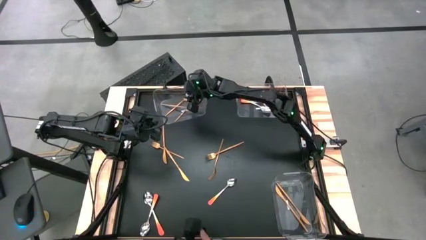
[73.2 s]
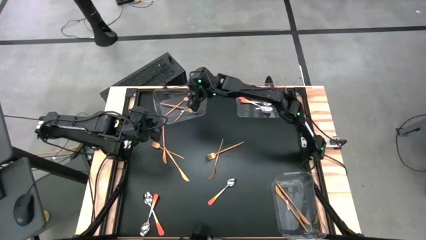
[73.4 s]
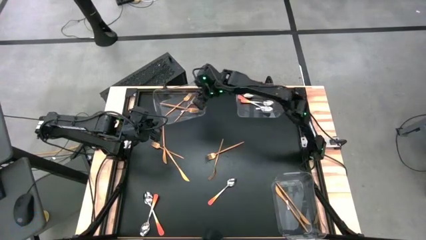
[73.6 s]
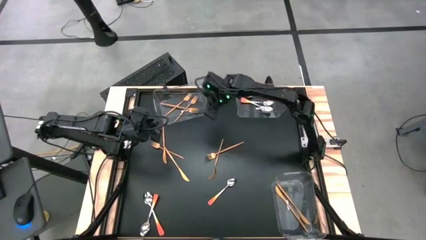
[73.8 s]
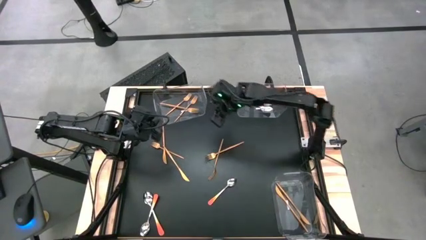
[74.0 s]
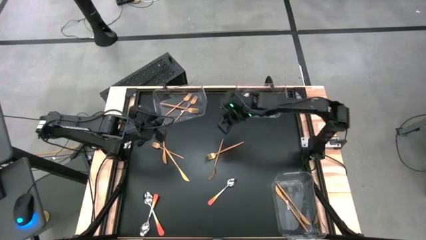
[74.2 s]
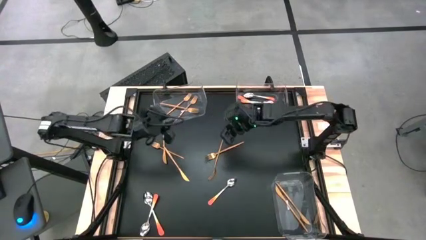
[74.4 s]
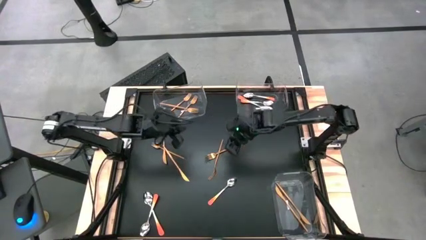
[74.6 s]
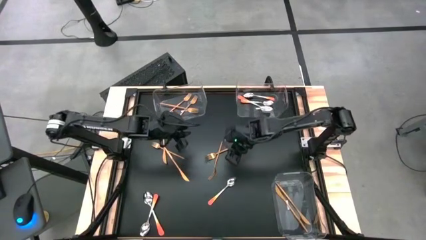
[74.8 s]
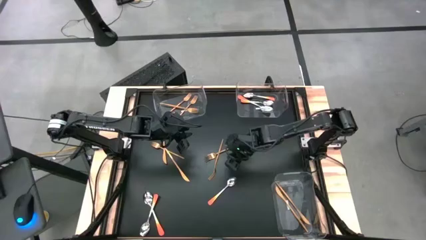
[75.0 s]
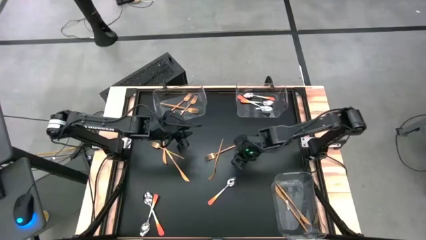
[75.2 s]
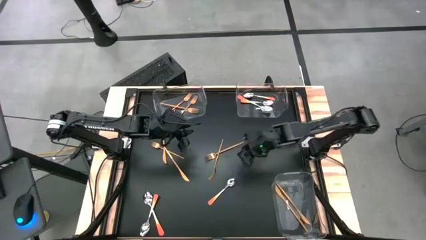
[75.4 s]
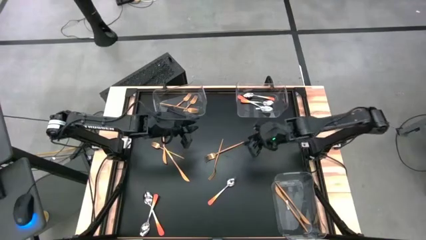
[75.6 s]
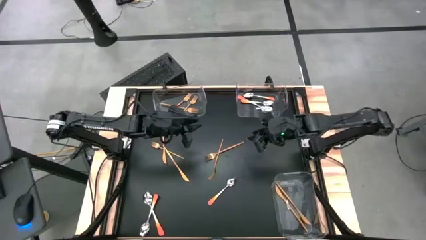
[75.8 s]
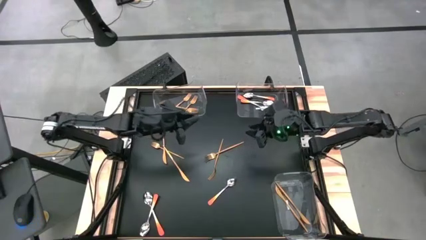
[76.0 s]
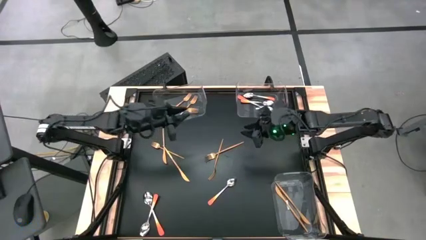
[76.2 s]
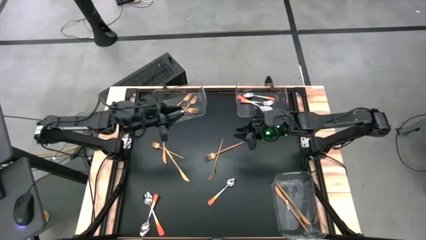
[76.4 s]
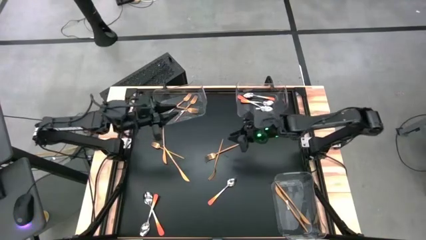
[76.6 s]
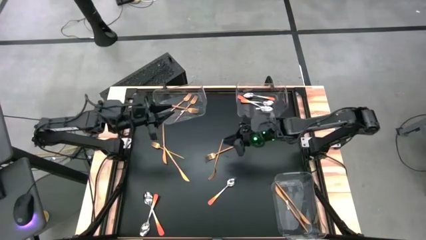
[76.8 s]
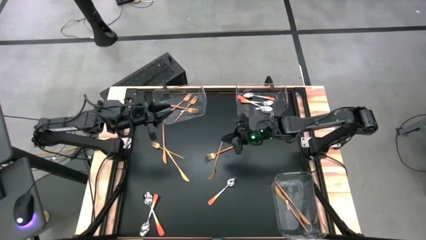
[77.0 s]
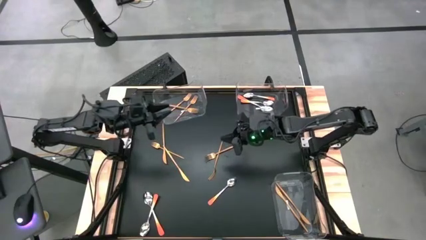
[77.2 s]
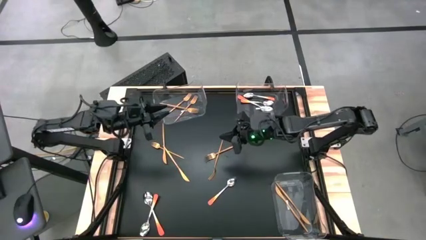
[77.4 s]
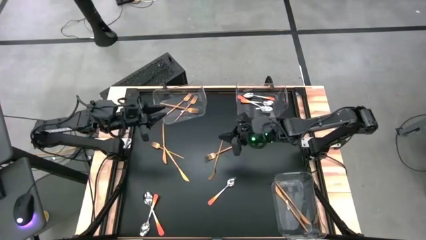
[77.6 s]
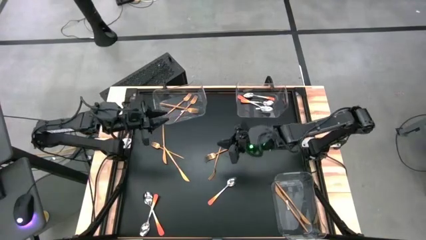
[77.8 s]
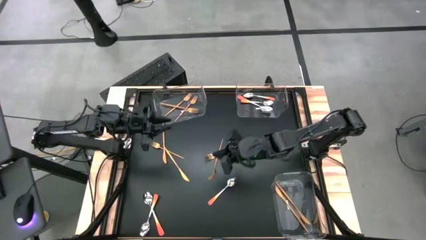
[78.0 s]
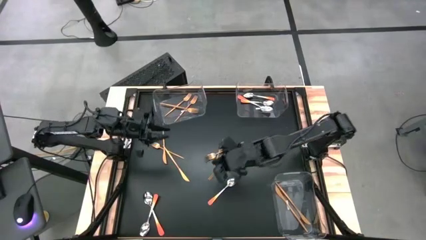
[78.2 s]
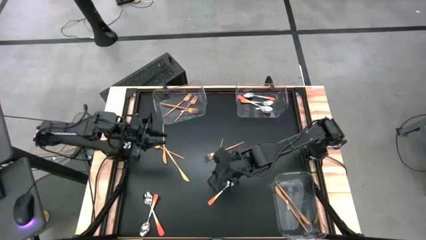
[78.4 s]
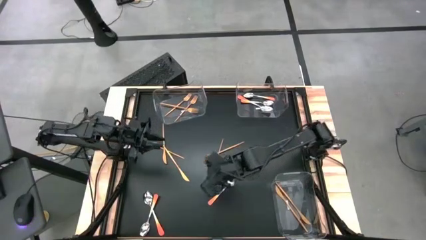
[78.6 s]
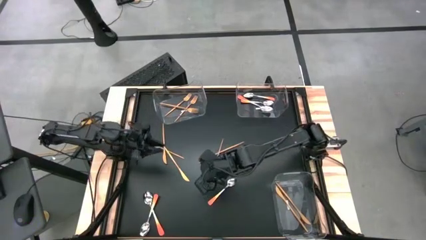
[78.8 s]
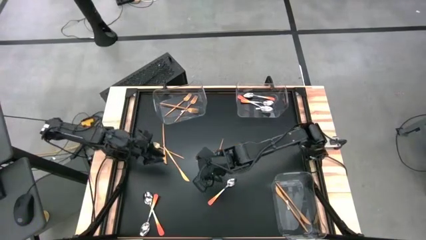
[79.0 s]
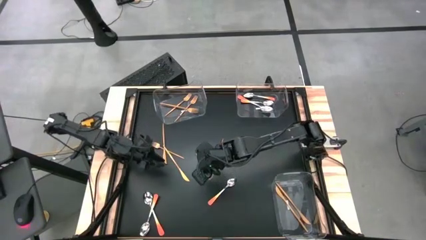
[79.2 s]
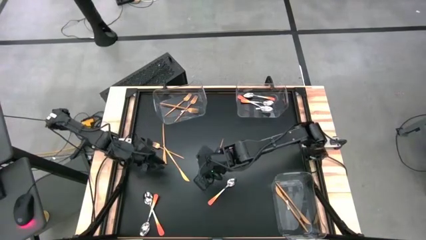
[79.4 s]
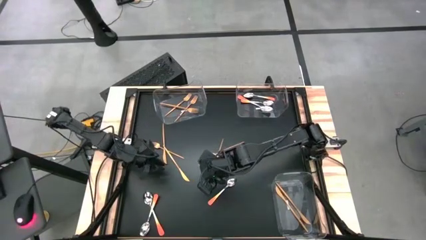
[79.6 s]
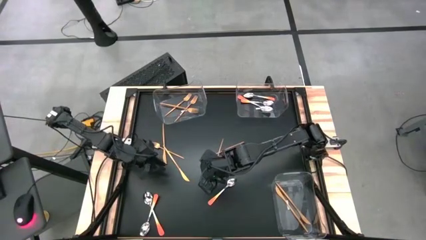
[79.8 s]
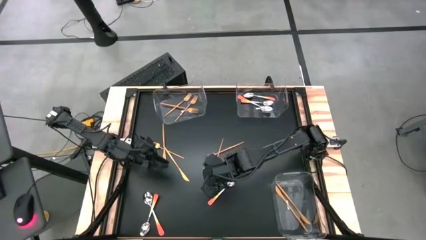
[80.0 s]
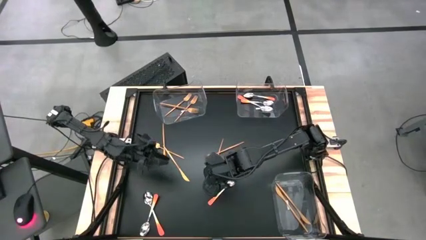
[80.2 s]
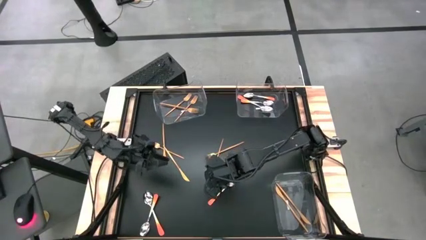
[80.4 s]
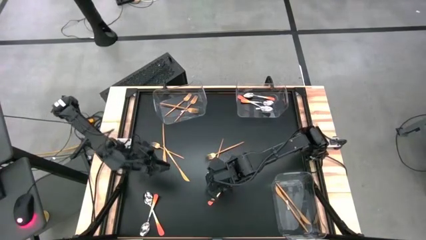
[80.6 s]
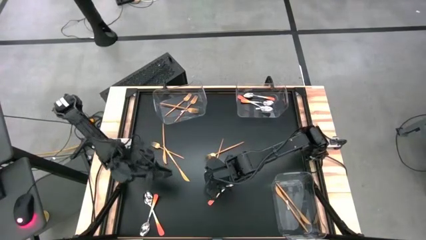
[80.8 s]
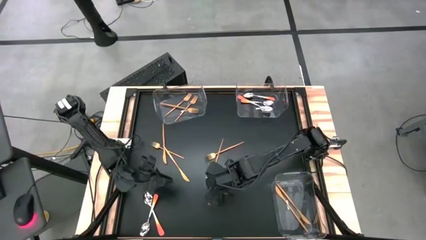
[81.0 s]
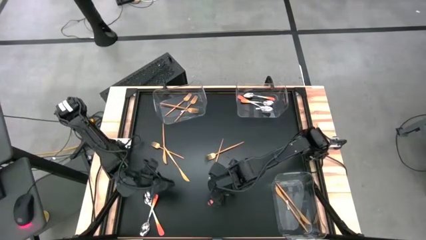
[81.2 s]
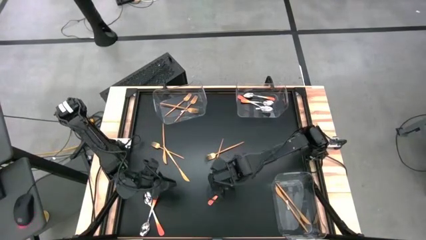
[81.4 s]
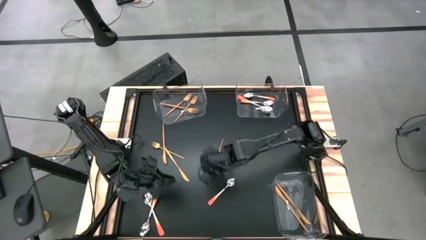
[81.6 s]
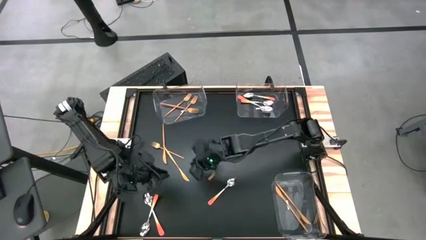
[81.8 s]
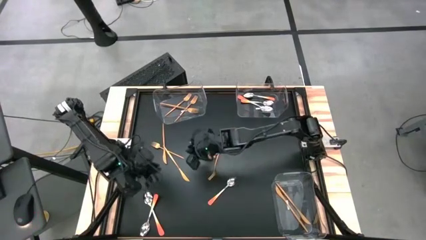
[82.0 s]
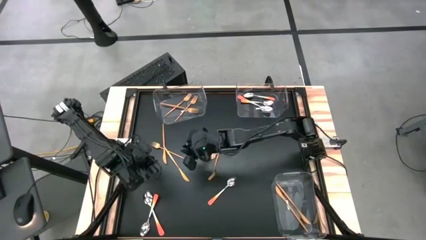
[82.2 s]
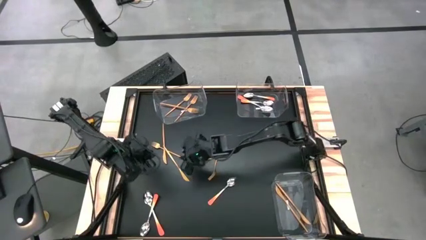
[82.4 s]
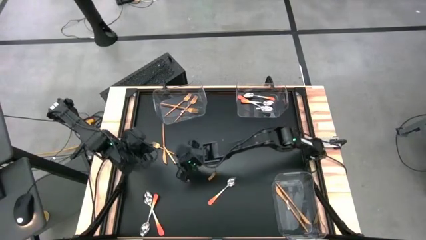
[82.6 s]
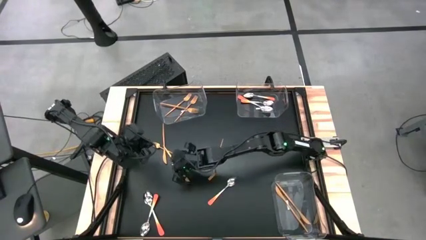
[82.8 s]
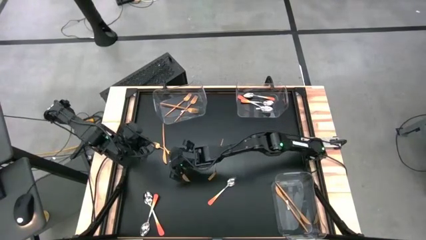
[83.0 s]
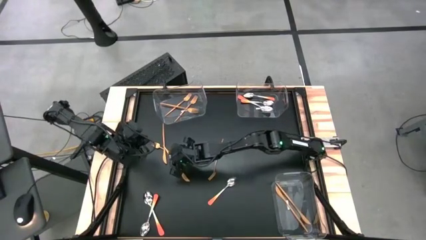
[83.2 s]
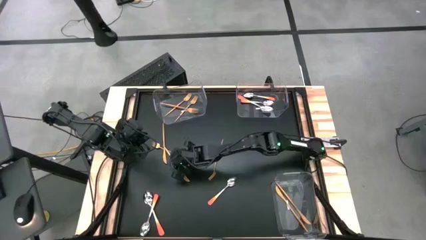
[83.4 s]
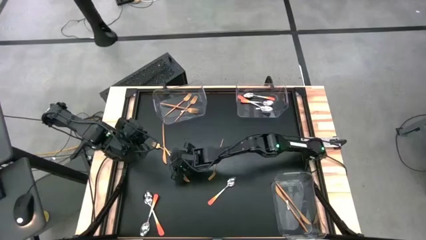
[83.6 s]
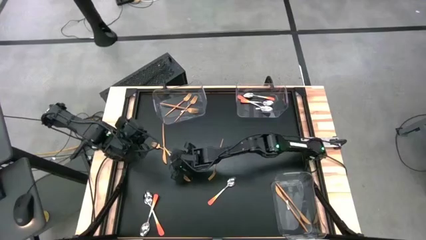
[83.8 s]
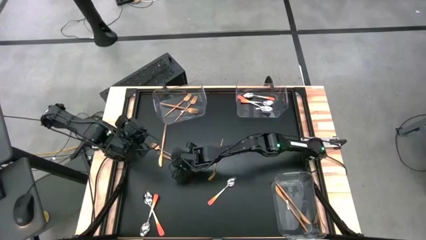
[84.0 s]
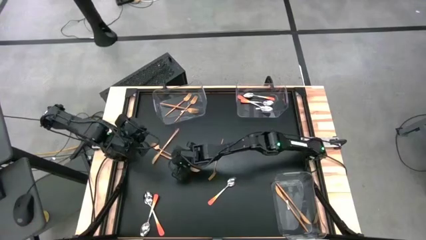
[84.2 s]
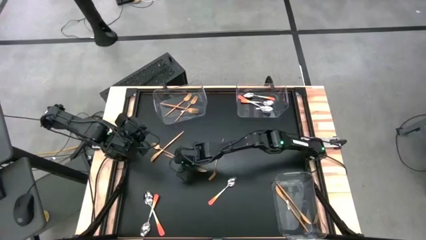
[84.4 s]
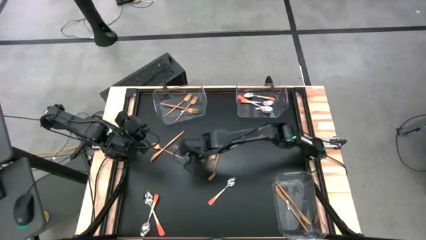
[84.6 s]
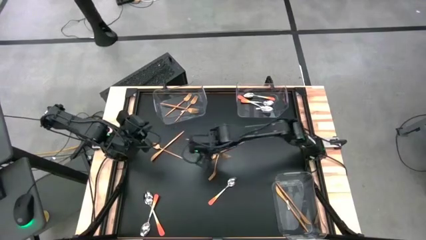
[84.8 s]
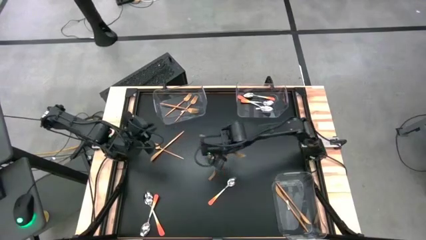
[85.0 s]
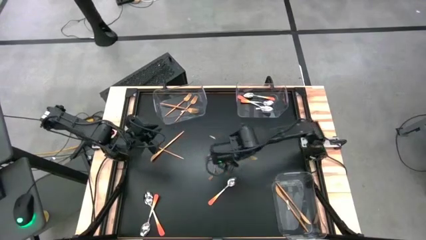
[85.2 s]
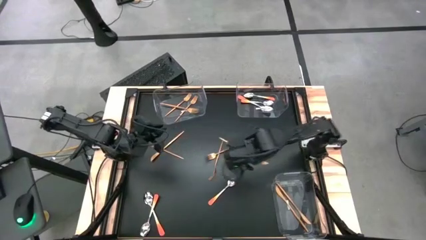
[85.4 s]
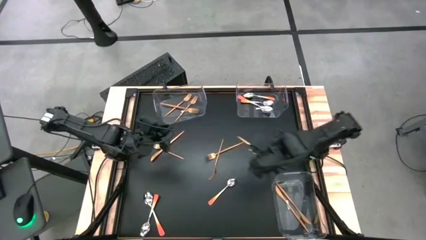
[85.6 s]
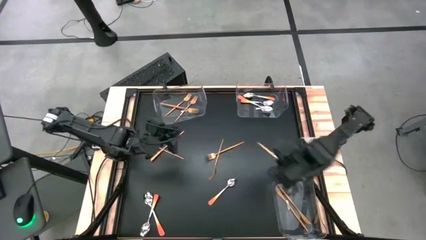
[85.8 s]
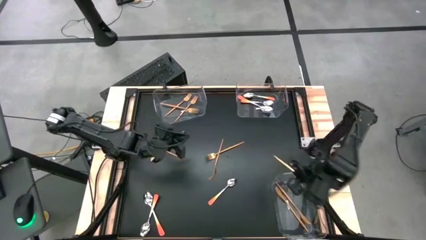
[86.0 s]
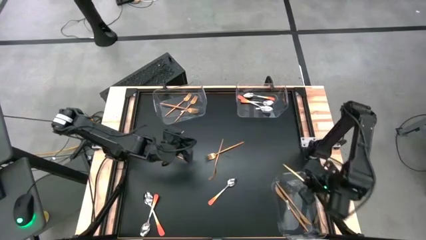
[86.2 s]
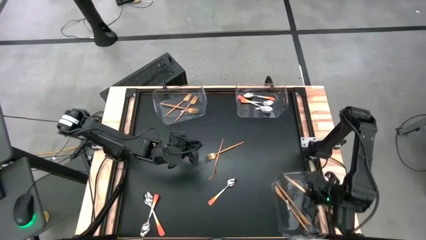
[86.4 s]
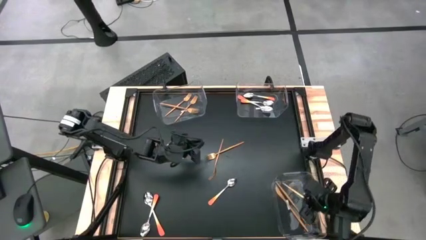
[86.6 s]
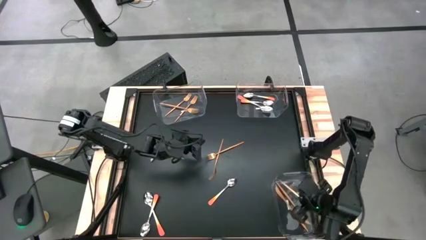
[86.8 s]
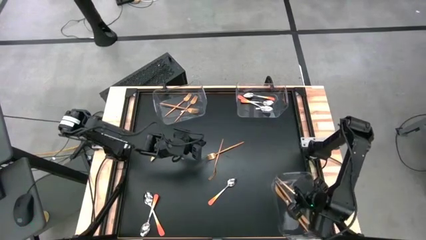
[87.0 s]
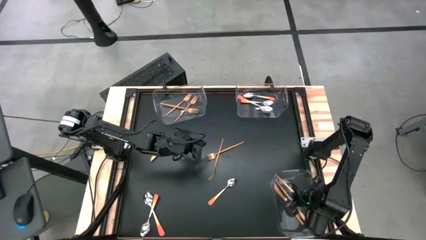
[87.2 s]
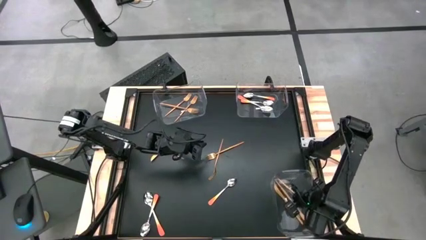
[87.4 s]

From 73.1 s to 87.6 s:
Task: Sort silverware by color (type)
Put the gold table knife into the bottom left transparent bin

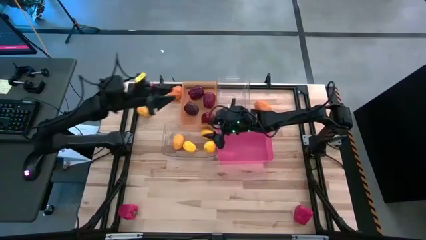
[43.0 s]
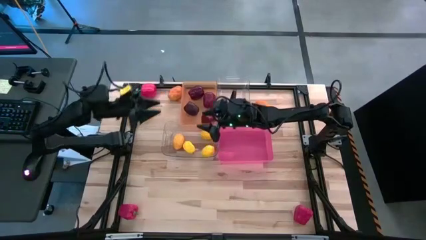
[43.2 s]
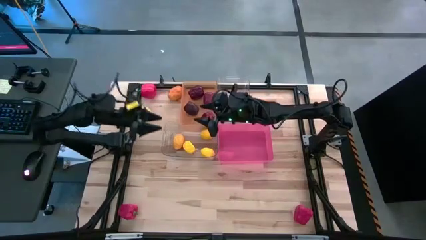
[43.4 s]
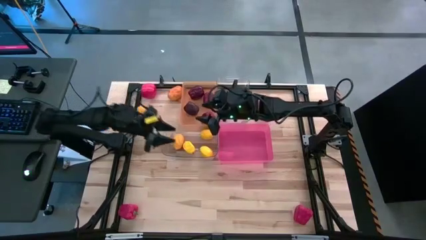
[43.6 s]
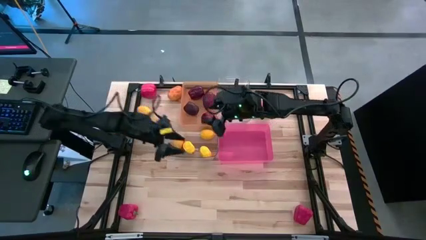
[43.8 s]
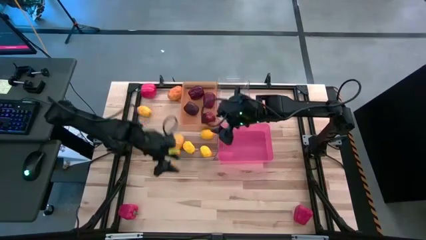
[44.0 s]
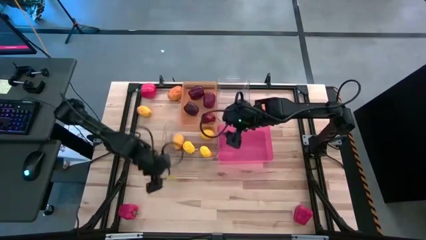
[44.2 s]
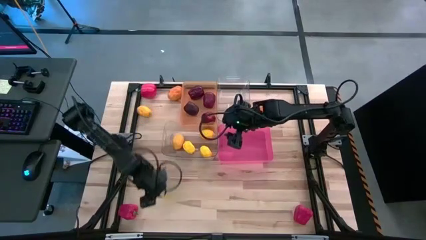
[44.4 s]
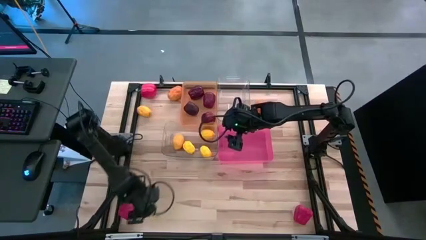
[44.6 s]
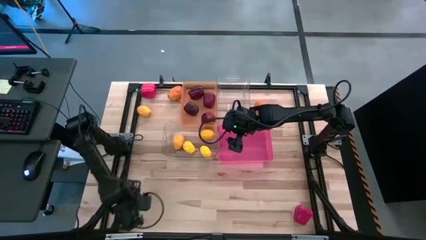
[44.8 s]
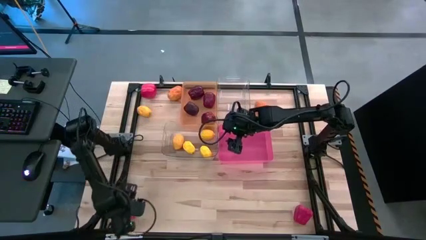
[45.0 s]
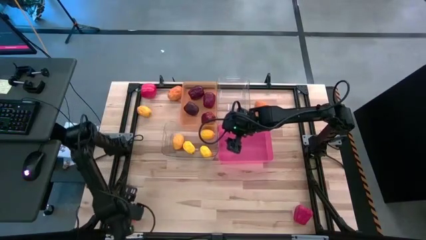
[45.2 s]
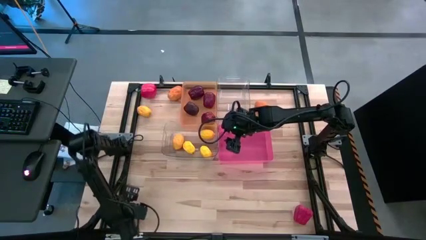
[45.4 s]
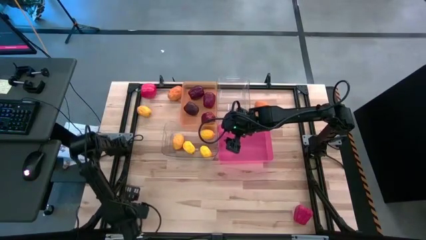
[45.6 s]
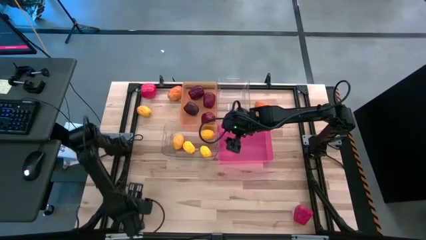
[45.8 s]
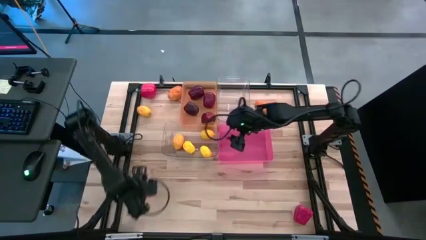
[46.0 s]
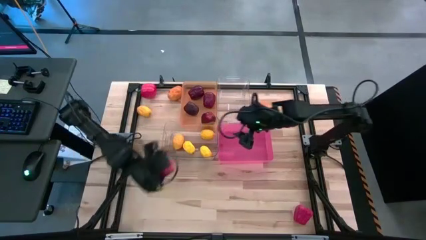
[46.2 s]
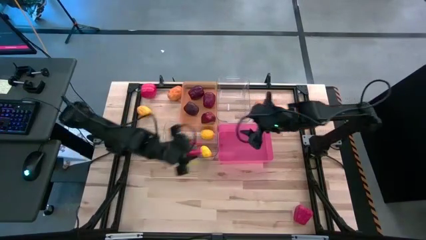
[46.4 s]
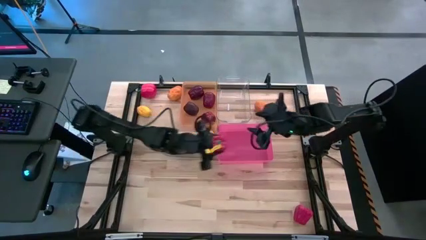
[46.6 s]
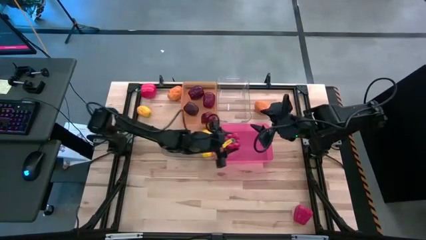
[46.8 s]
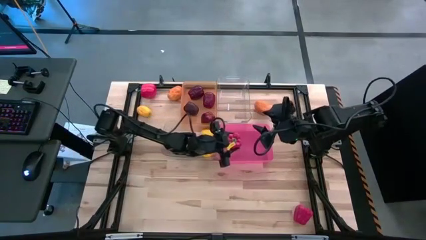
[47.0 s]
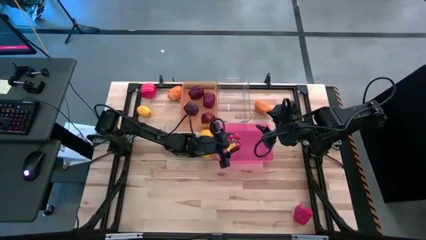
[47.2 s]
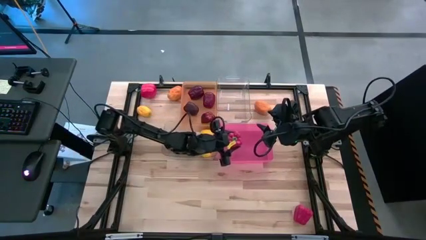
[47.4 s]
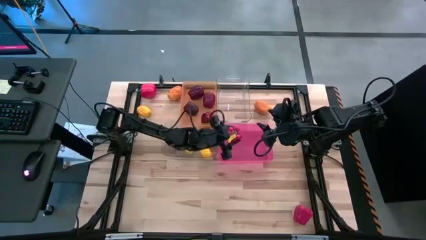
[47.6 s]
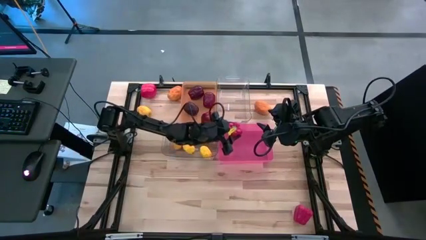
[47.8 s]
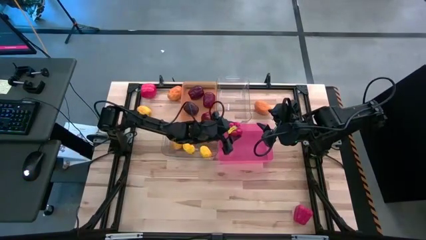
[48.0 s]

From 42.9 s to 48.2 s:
Task: Sort produce into baskets
Put the red bell pepper into the red bin
